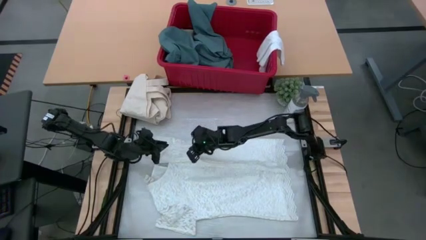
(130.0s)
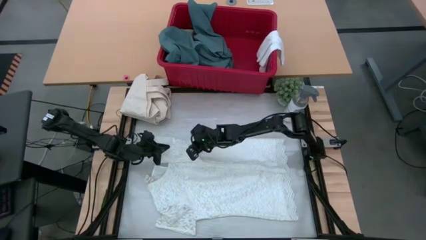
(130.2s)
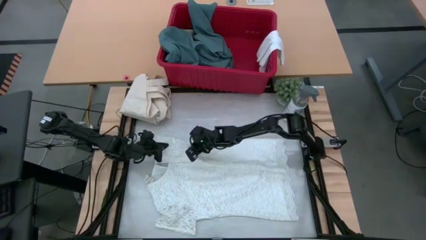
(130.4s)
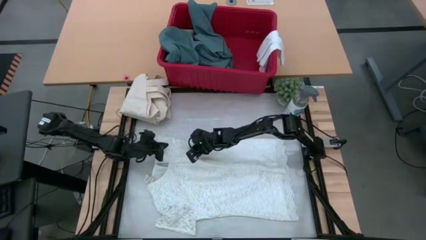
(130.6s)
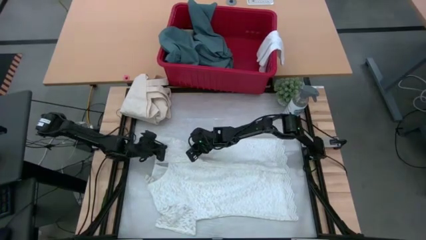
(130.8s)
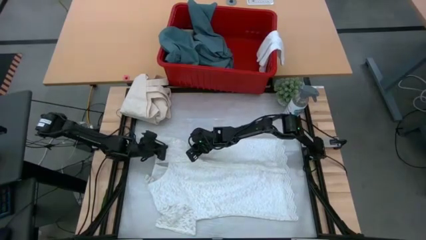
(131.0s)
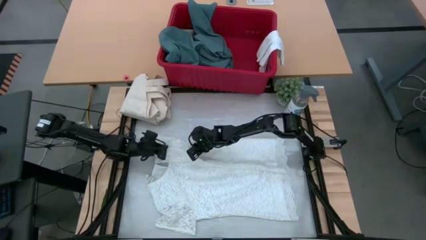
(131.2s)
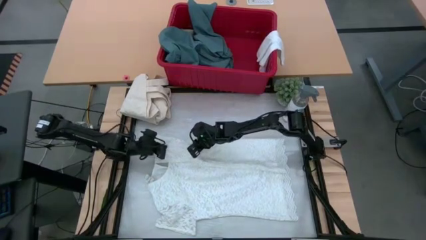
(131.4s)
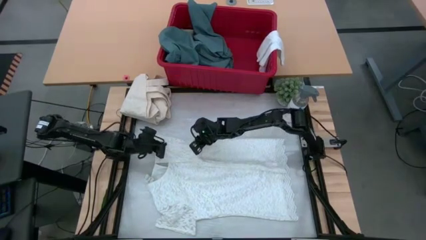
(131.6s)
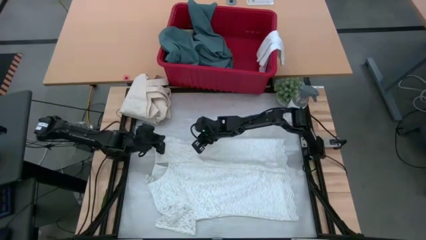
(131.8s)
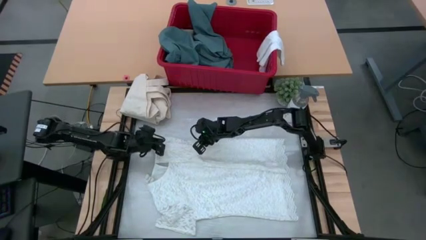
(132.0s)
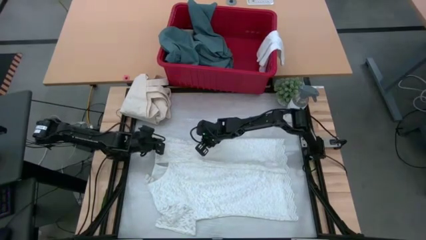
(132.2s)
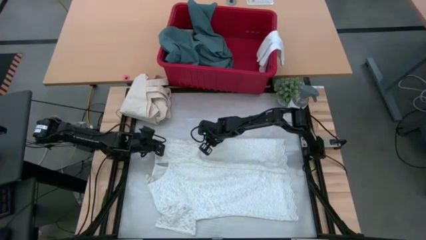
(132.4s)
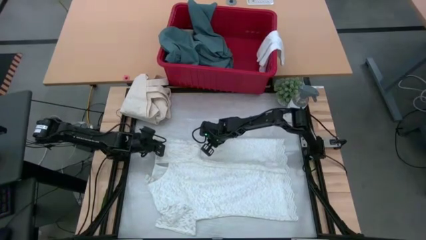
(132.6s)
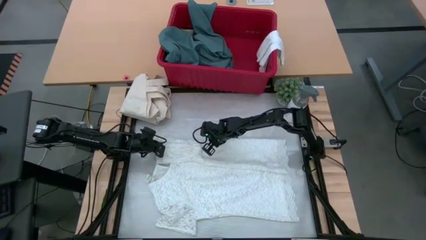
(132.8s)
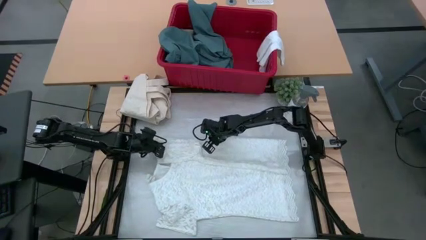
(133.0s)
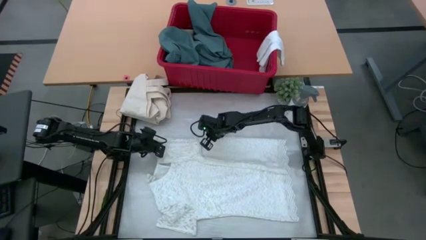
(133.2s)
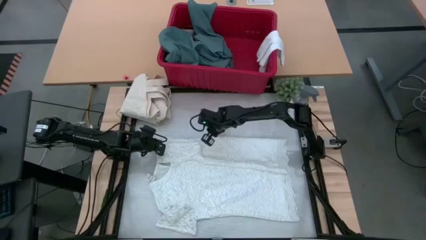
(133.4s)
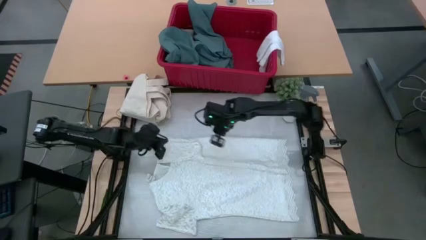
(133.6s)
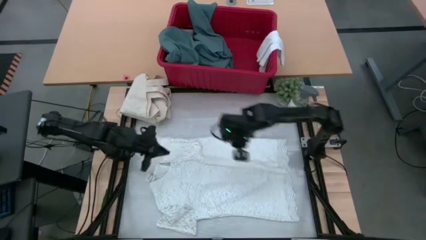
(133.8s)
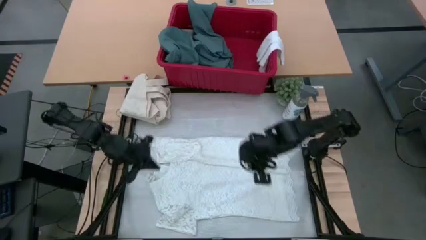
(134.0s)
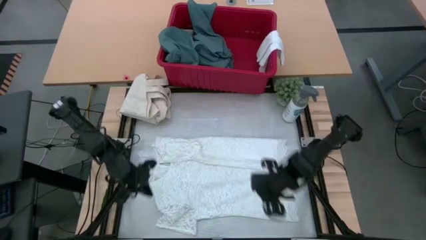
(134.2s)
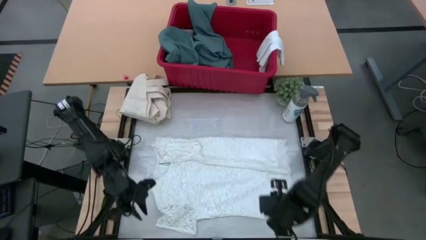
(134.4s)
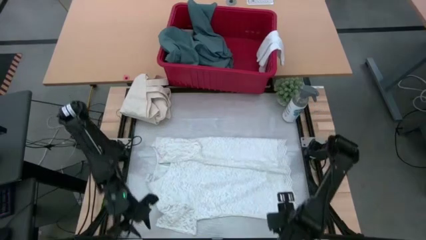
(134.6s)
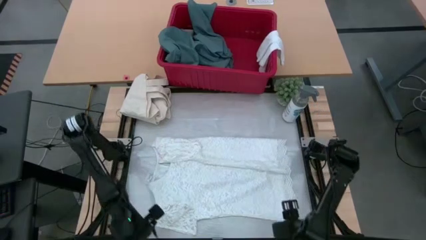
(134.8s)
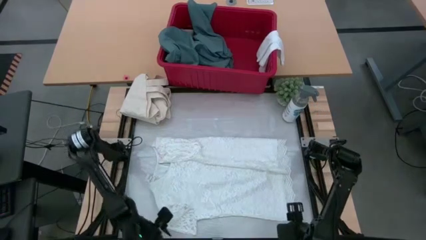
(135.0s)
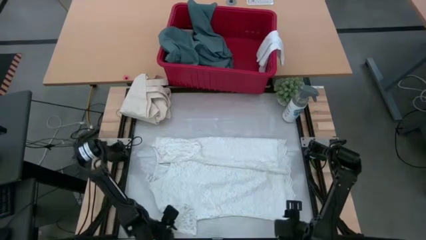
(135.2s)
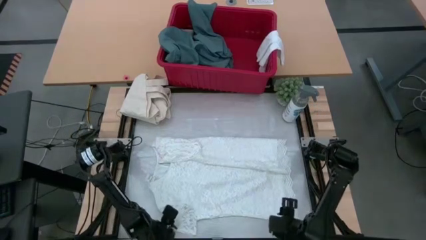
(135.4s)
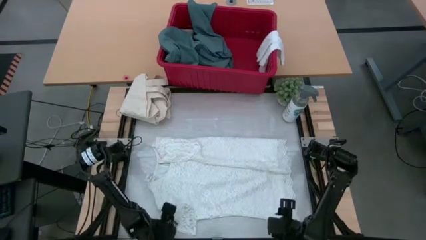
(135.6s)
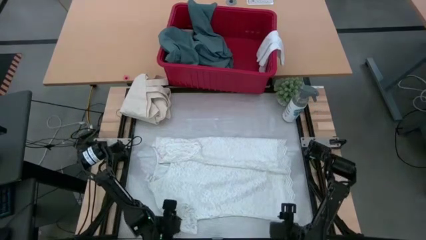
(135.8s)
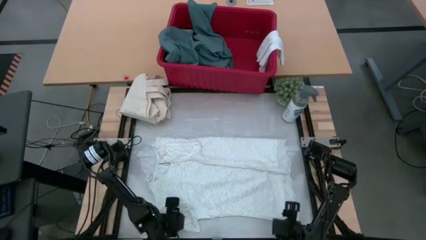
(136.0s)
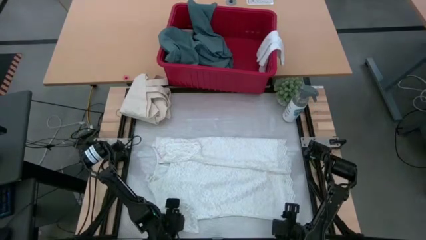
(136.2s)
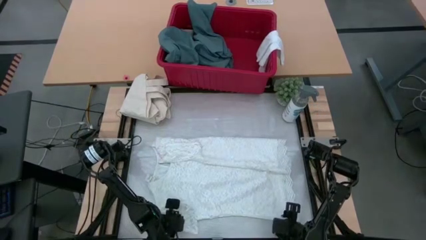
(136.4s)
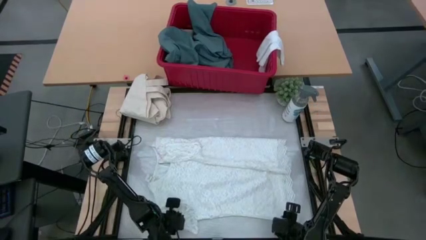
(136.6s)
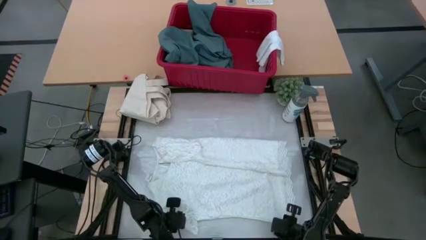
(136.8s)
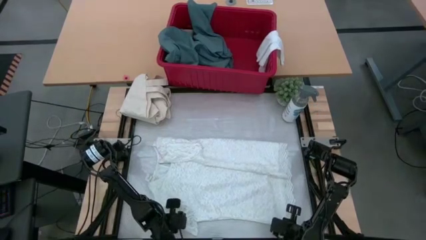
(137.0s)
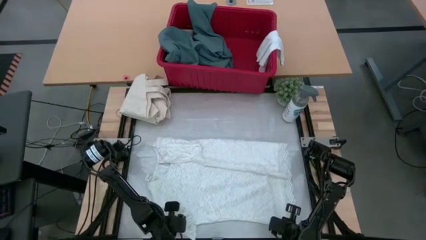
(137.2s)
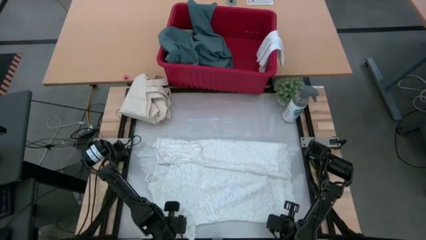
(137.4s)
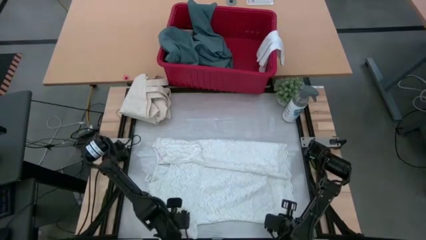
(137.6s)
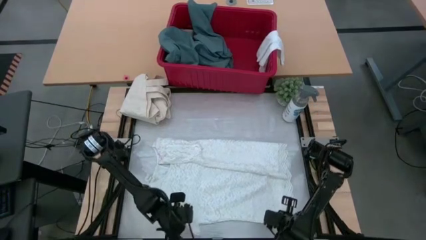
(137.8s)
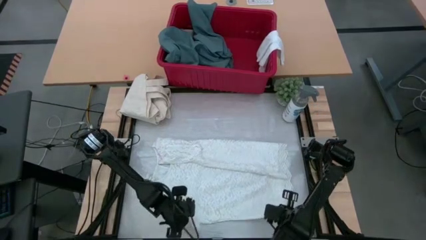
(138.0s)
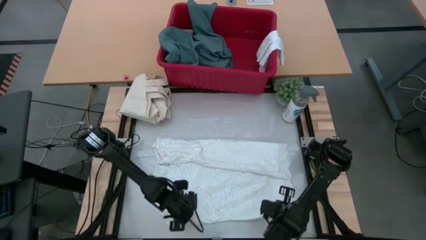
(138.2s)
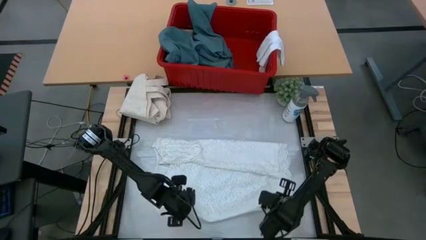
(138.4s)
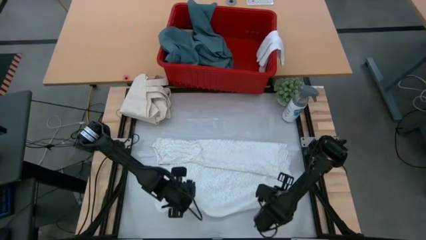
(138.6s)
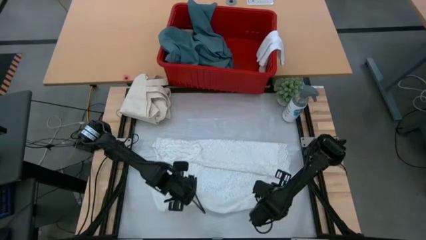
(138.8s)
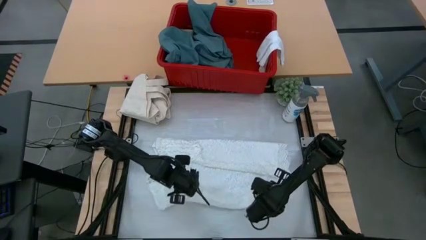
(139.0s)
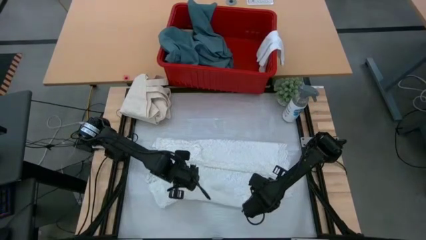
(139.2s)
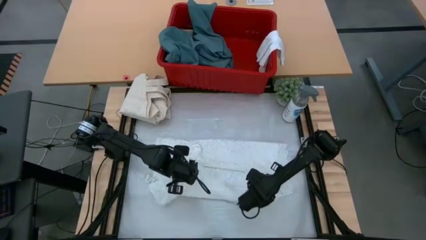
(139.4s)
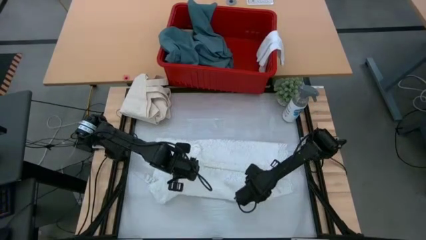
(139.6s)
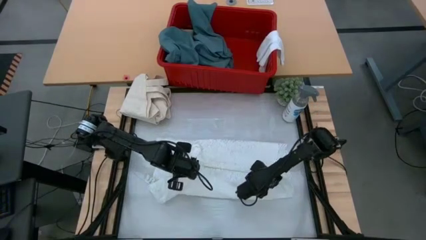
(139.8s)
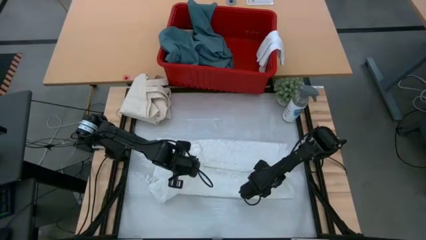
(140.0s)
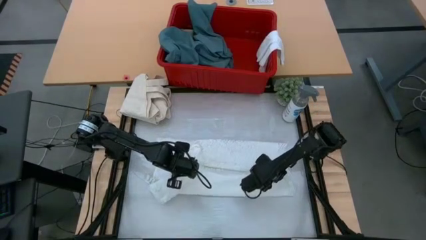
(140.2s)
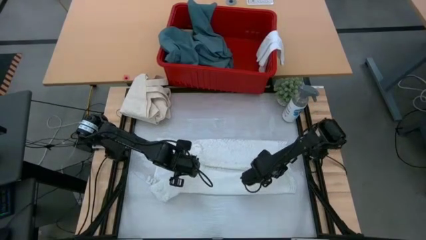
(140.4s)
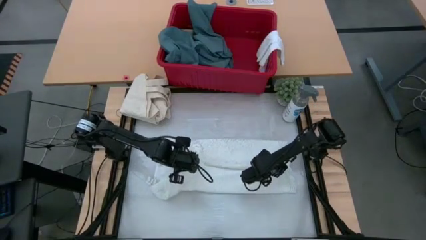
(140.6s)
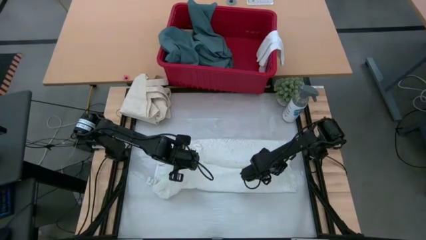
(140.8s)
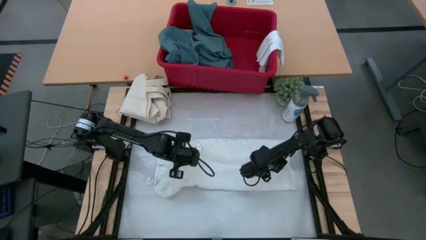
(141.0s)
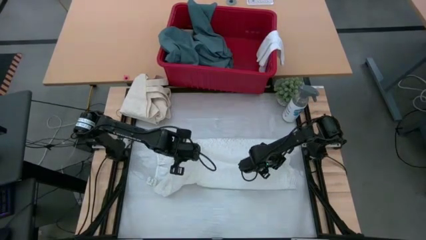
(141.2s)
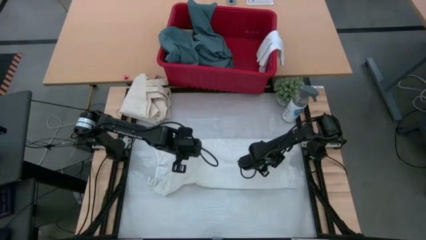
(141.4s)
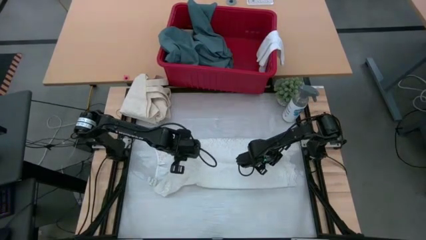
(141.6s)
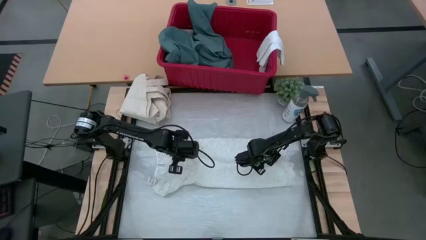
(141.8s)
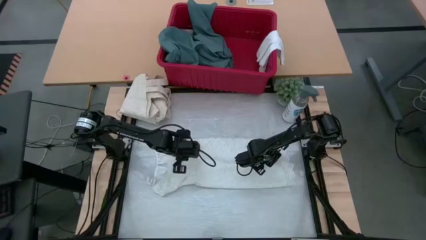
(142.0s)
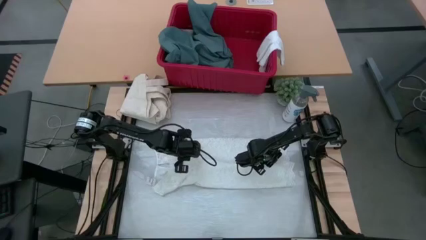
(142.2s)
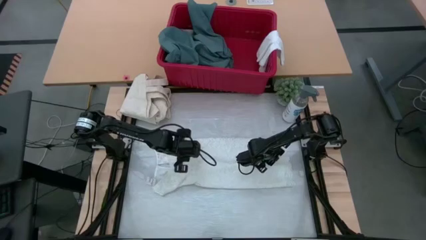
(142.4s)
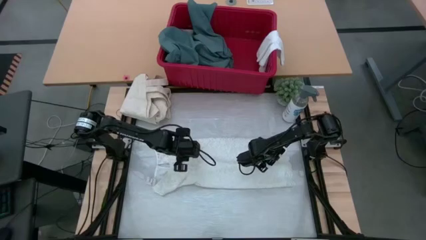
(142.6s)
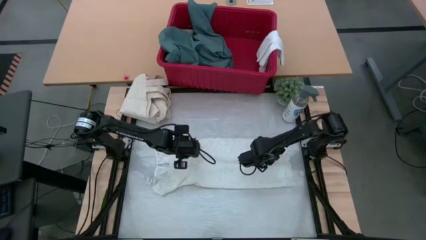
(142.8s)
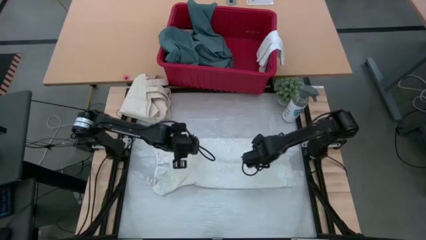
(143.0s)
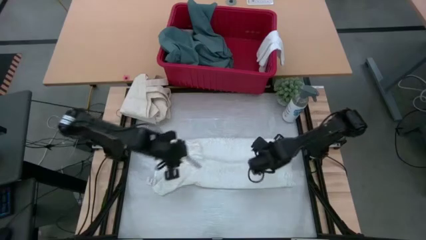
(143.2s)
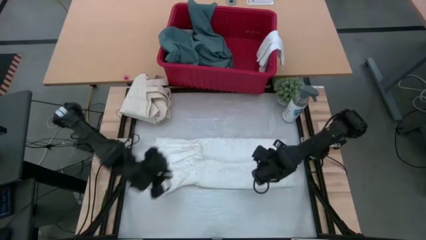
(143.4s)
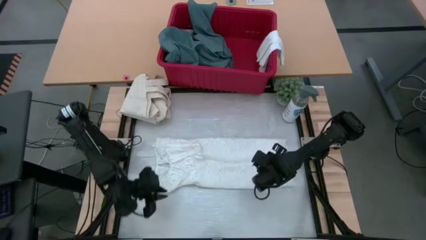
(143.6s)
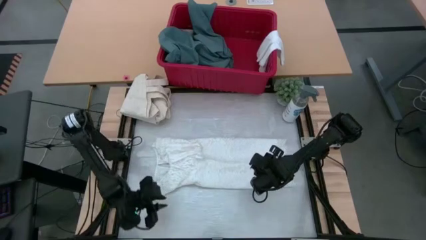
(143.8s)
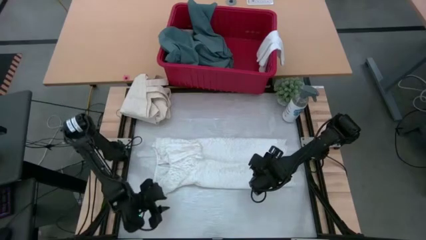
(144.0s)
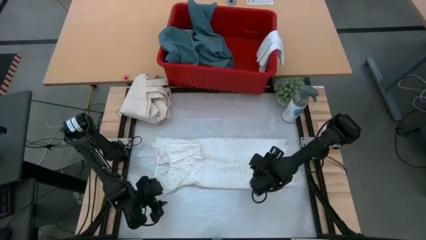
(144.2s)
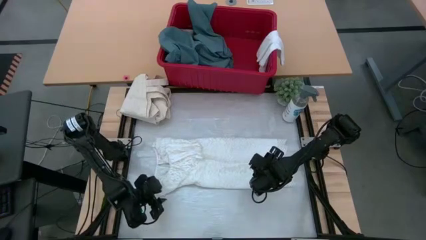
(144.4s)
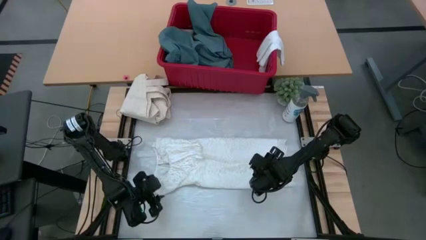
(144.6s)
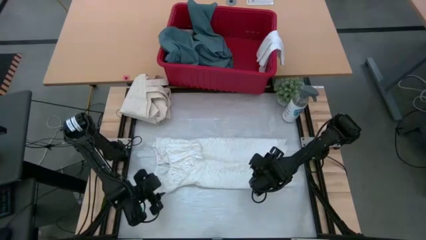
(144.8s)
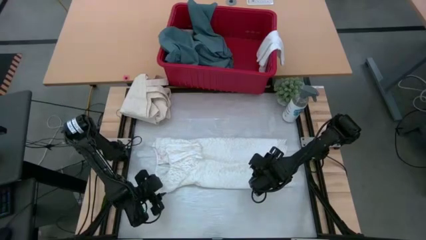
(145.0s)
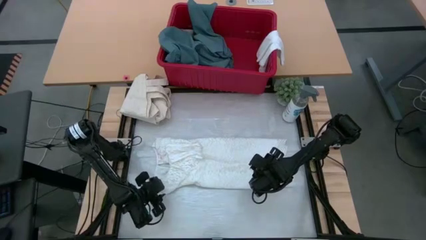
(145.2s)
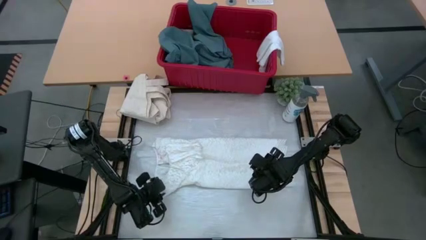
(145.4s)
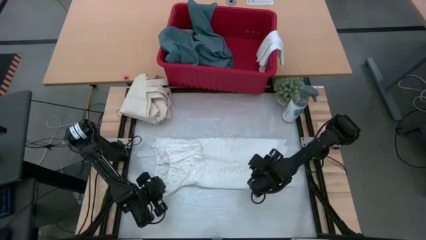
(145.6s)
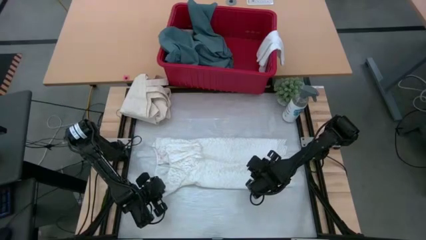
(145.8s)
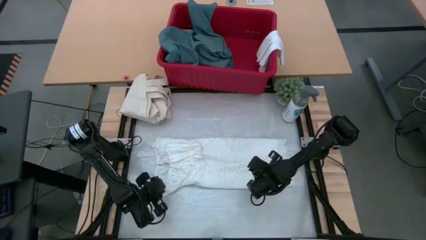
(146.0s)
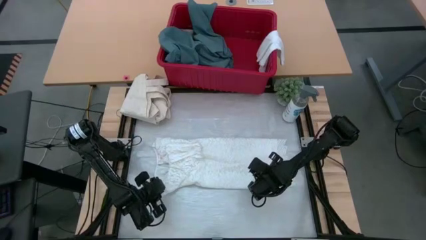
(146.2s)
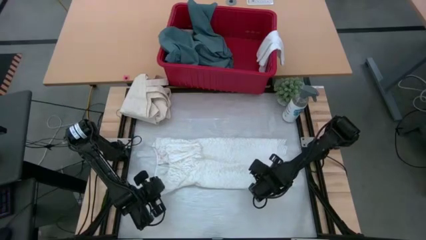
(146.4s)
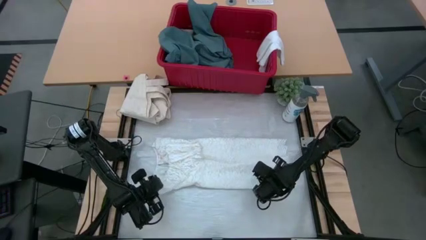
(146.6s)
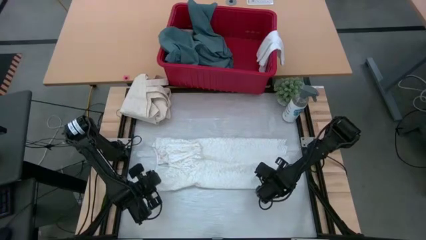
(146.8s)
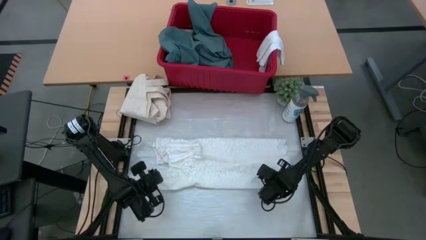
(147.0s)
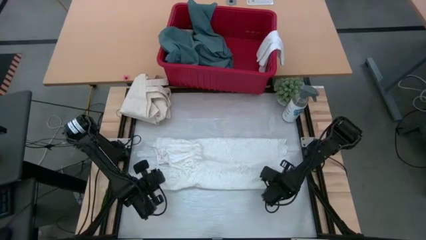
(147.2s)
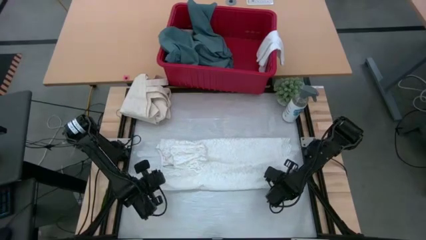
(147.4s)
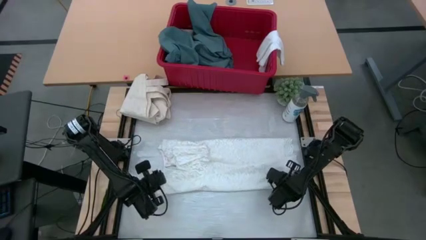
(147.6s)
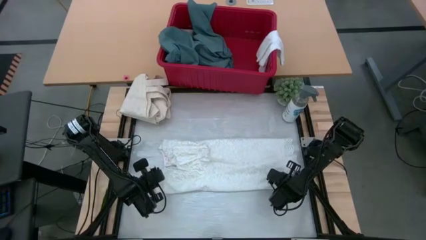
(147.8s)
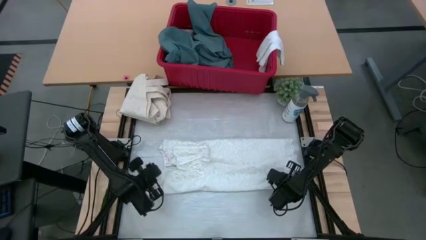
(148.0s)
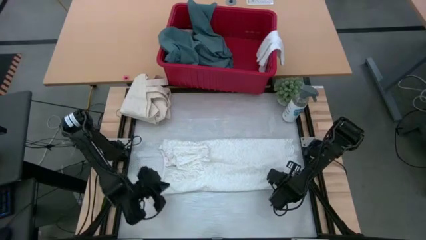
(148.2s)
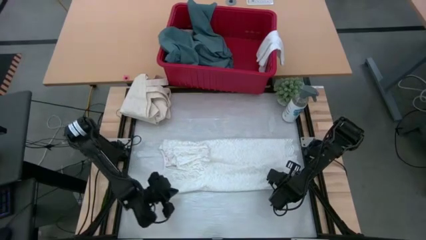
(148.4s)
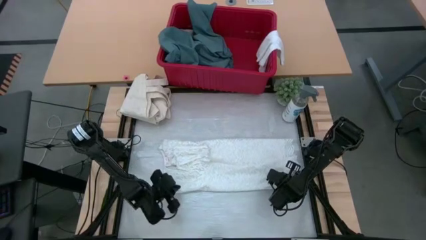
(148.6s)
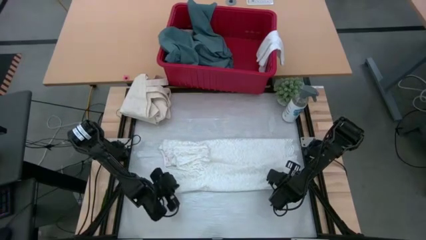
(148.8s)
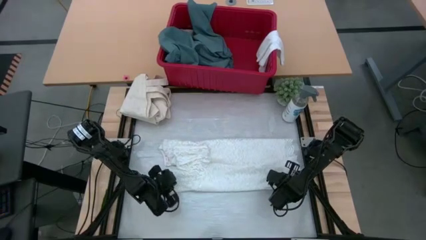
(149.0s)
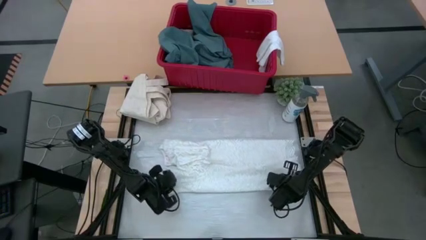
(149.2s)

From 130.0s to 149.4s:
Task: Fold Laundry from Bin
Fold the white shirt
